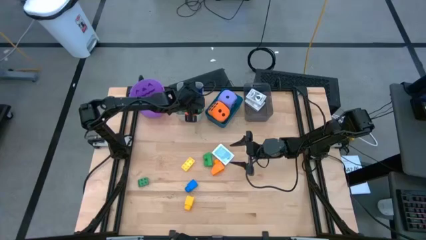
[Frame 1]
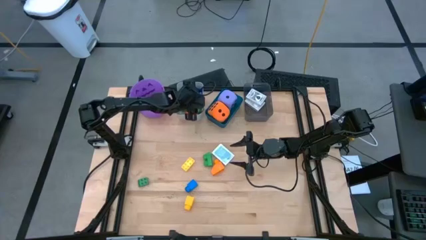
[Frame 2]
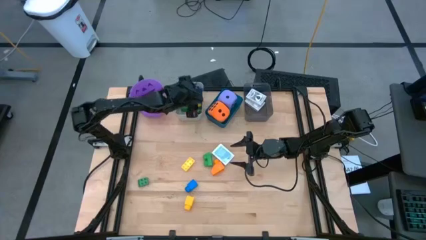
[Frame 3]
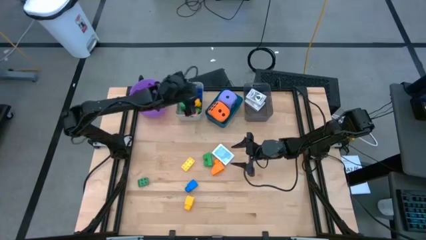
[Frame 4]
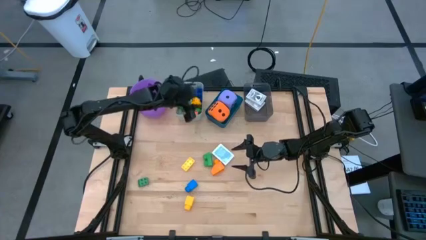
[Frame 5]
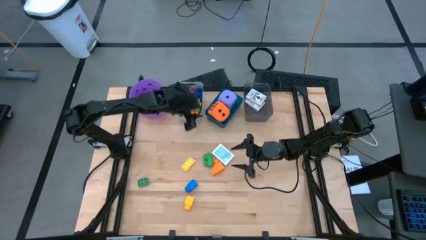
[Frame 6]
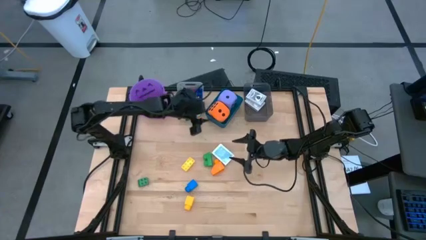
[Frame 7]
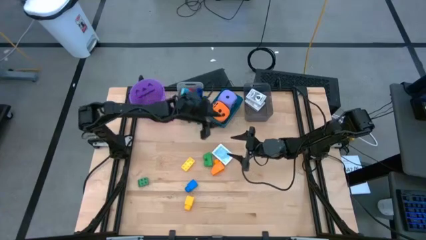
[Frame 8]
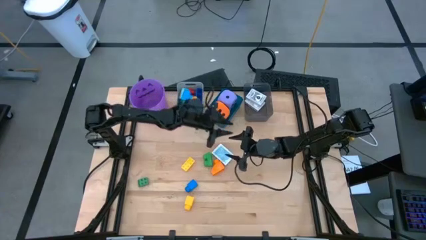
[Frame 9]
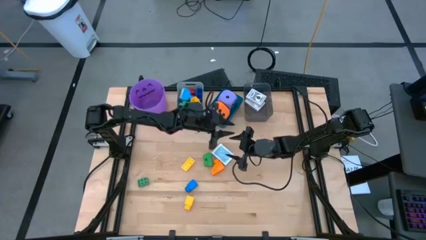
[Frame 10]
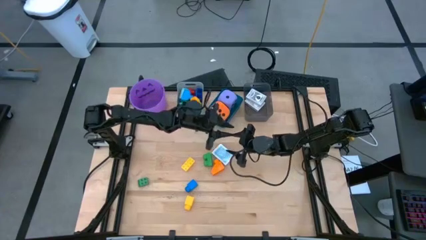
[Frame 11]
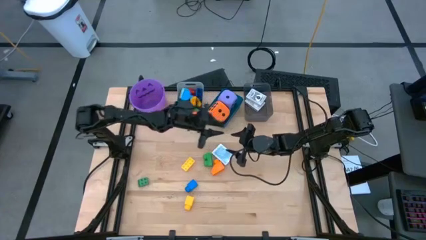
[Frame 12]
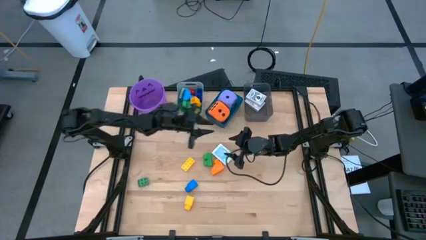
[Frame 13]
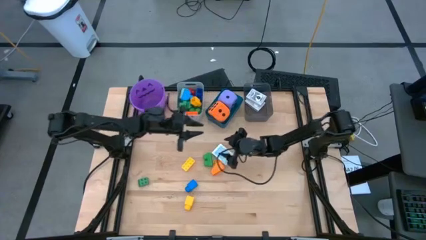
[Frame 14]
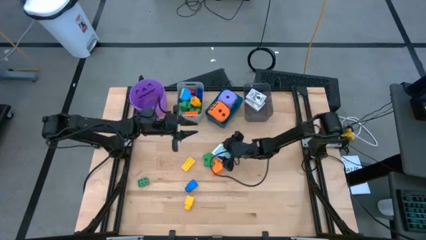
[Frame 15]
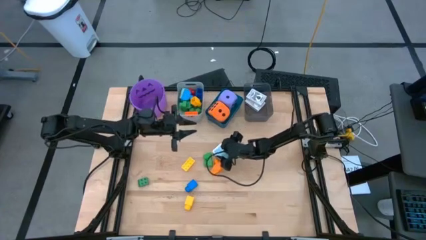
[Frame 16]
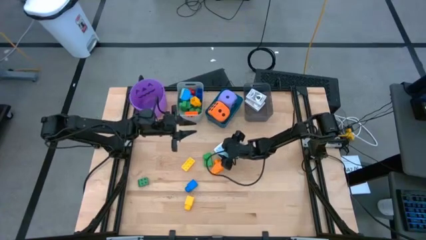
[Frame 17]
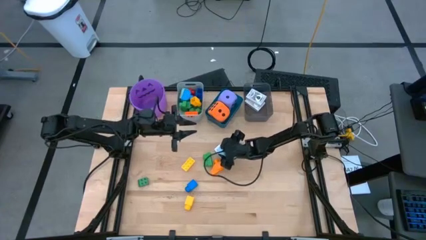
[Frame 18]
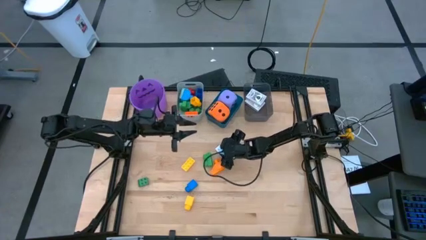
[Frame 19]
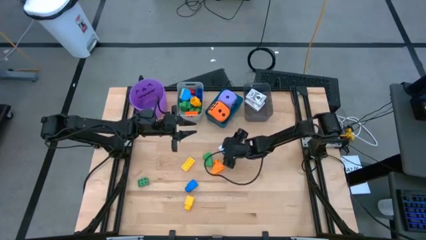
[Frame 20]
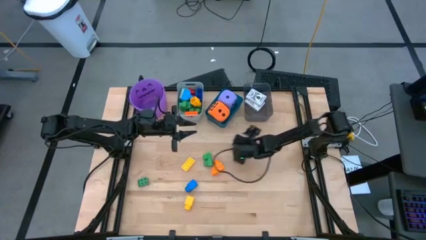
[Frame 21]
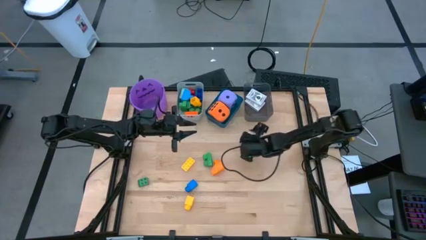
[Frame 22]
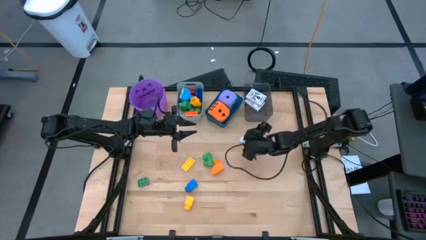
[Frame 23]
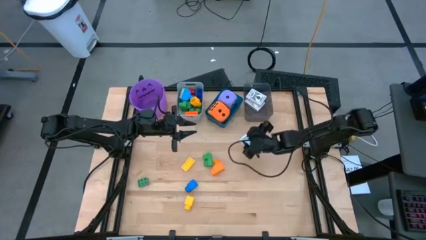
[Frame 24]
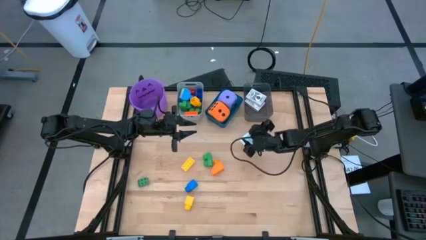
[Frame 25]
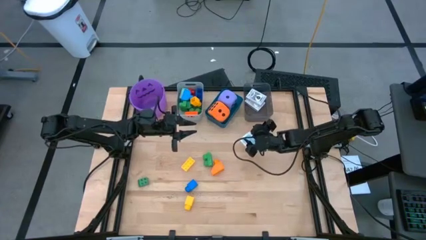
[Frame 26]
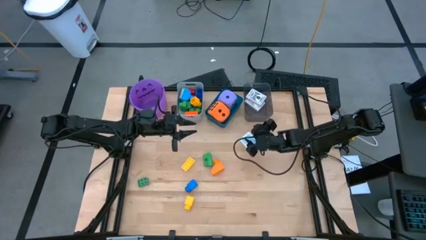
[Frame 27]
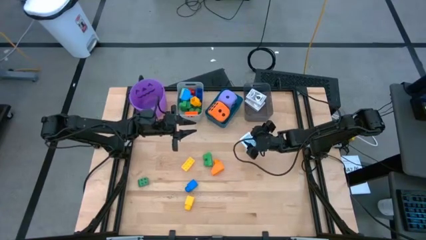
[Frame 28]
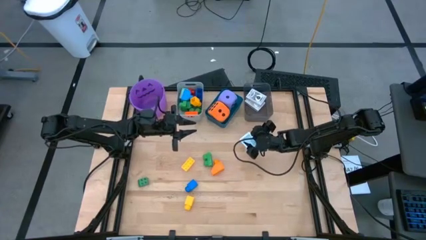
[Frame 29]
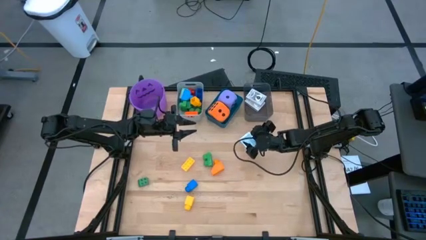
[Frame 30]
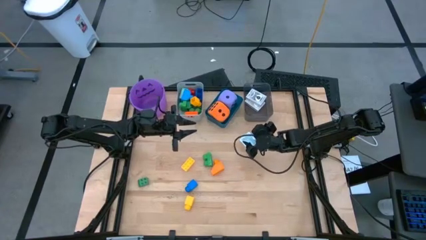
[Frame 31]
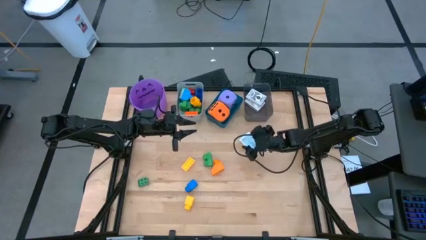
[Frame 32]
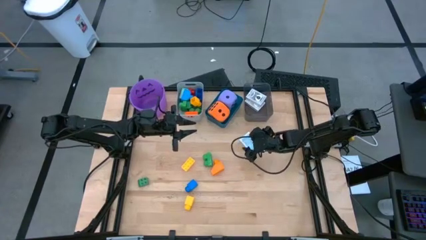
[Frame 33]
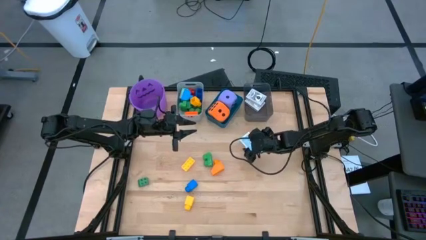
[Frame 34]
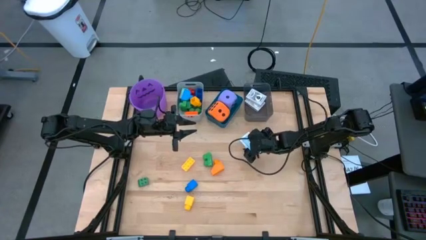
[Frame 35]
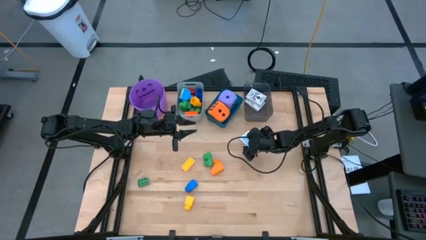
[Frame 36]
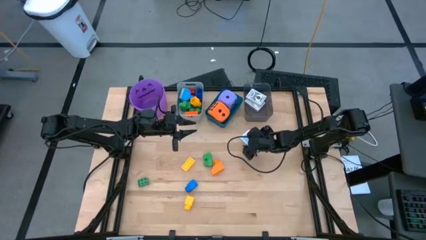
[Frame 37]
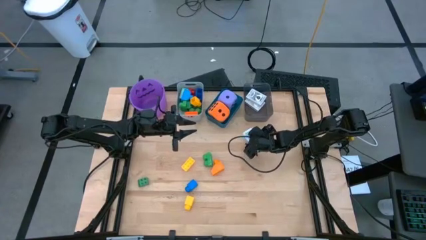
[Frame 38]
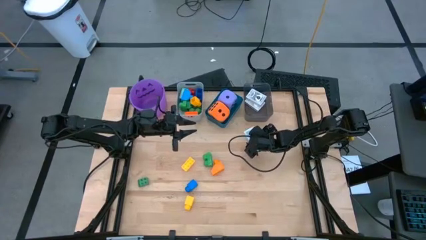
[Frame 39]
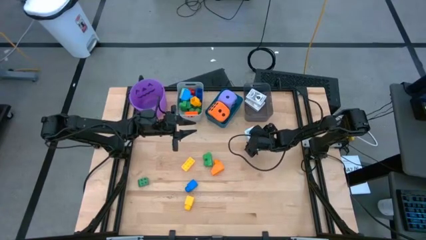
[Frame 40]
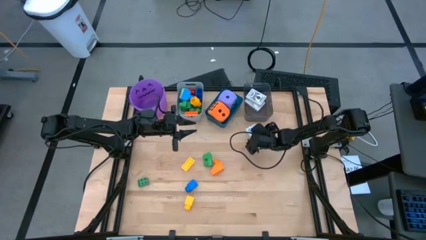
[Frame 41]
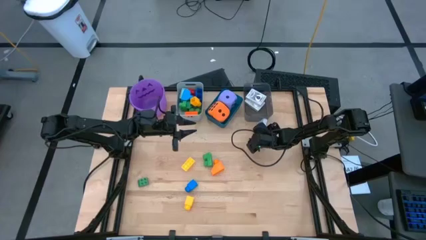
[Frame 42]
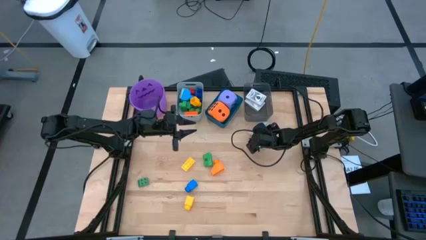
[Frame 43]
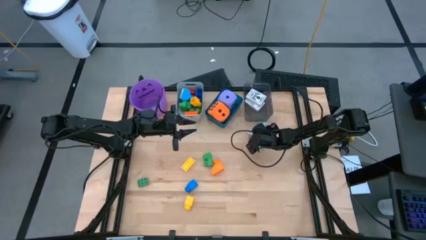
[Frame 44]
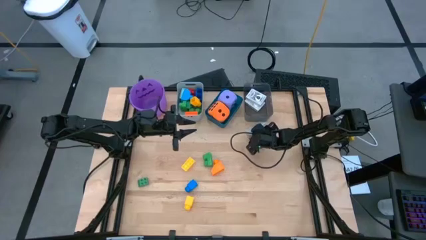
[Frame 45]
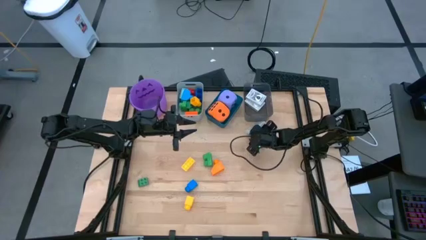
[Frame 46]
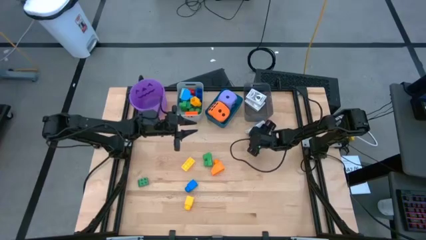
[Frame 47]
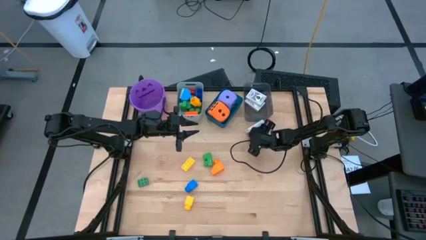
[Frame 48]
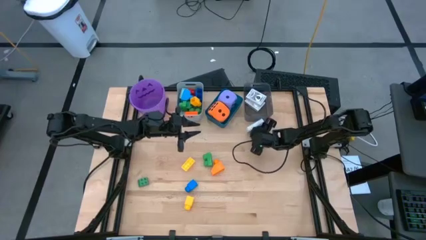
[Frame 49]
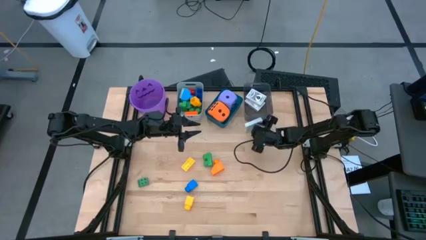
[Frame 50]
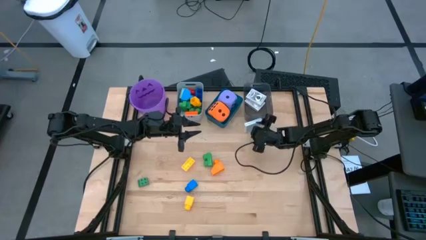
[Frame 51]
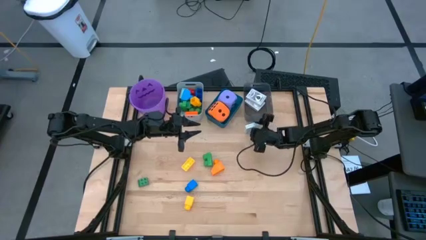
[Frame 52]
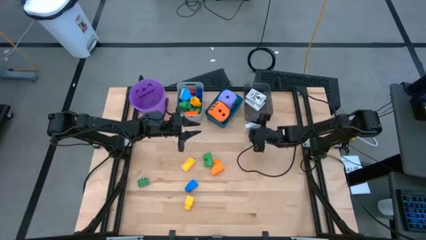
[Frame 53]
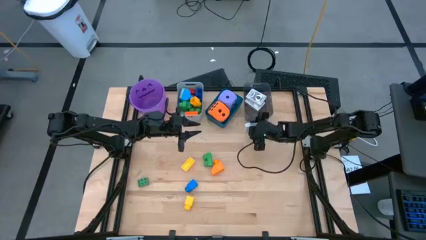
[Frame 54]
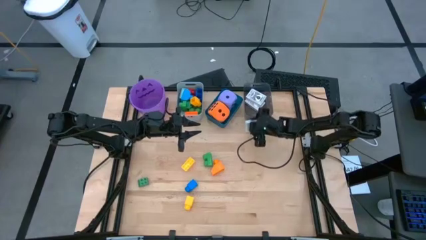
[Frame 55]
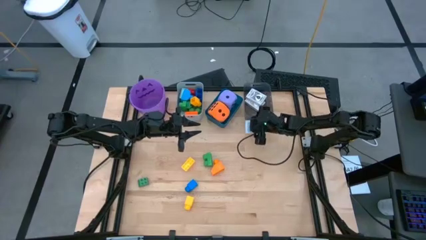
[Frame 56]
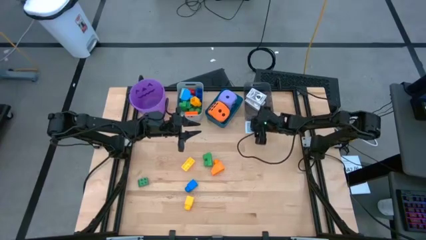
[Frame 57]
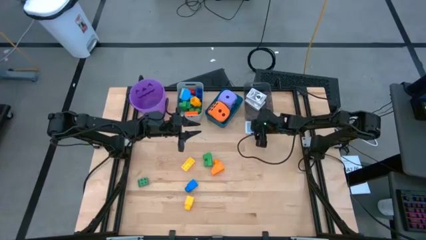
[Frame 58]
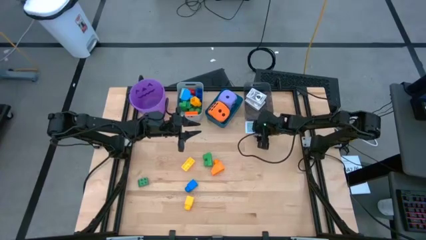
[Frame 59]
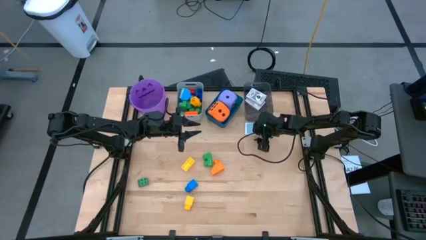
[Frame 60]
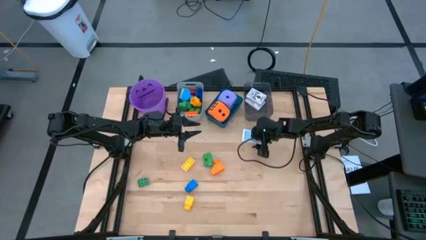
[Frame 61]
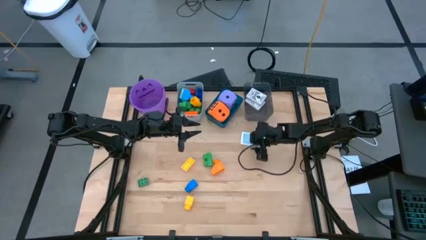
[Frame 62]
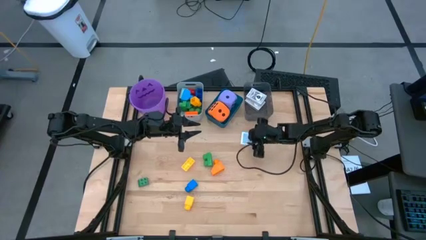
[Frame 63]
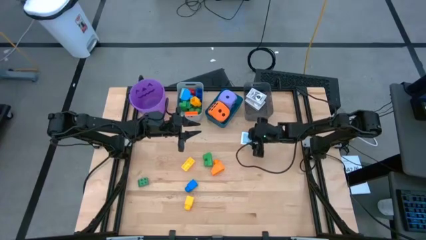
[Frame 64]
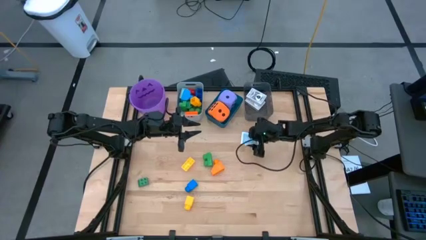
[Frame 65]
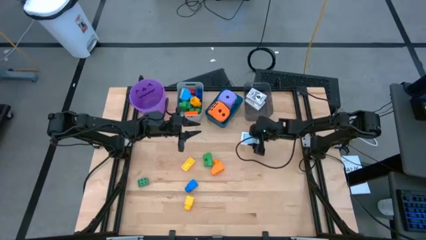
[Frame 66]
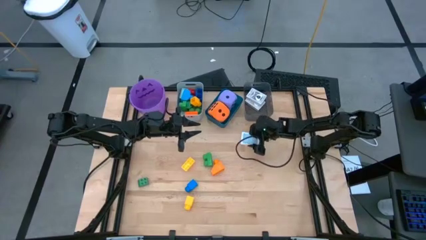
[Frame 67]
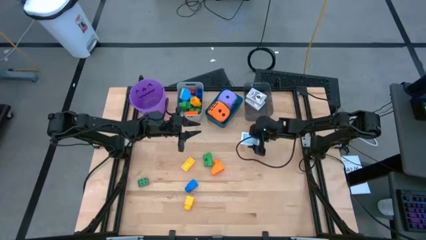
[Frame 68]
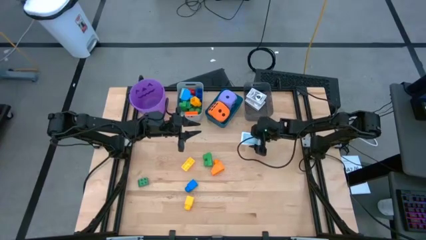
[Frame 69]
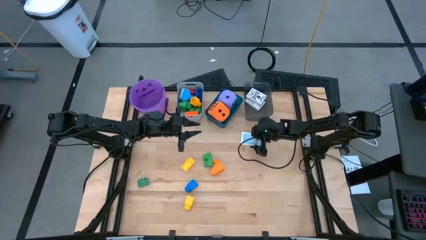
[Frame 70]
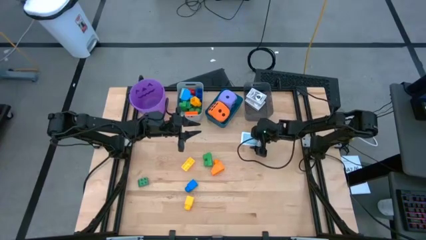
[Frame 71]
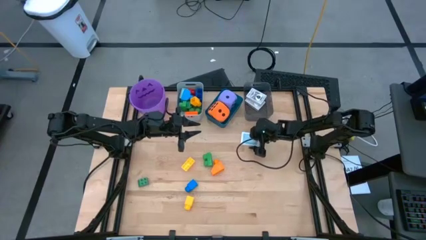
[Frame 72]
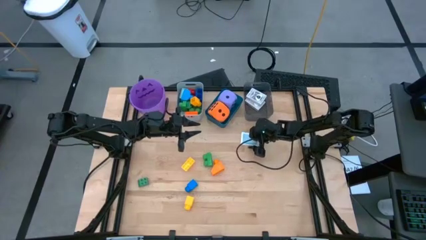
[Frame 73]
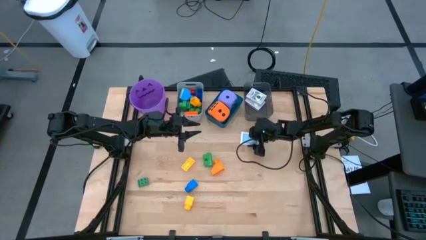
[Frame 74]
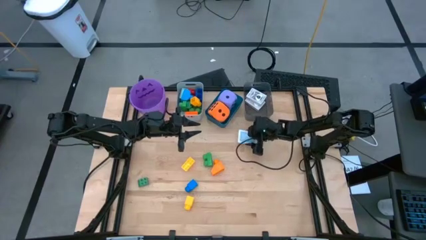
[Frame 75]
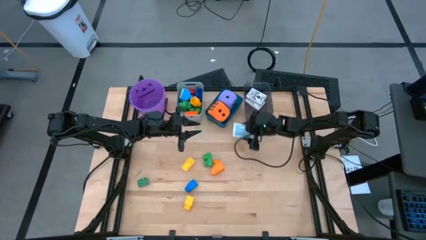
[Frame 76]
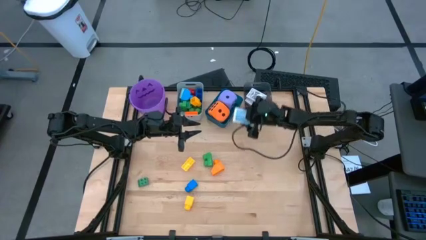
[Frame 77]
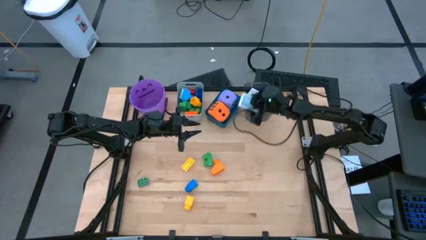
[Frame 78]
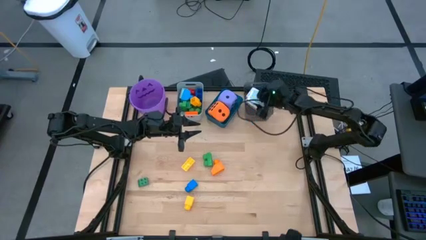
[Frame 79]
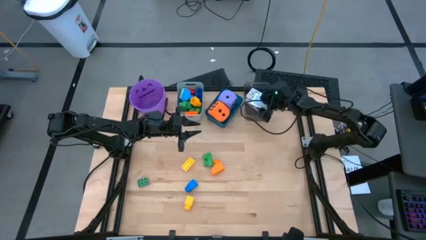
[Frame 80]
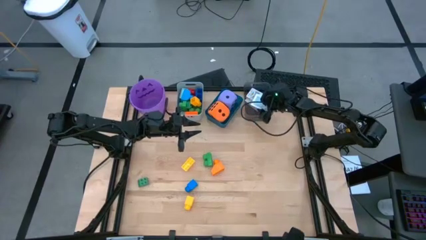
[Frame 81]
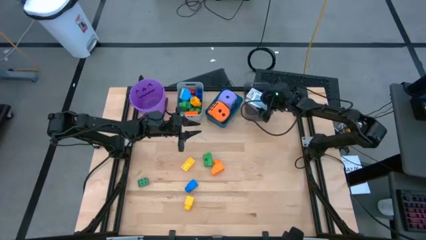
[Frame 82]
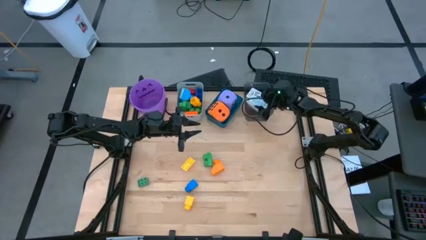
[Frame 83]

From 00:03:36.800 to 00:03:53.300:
Task: Pick & Place Toys
Put the blue and white deck of cards into the black bin

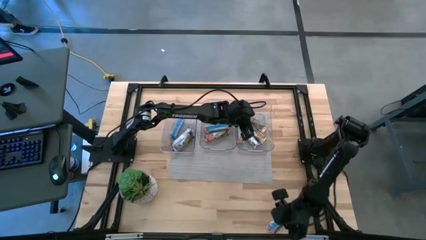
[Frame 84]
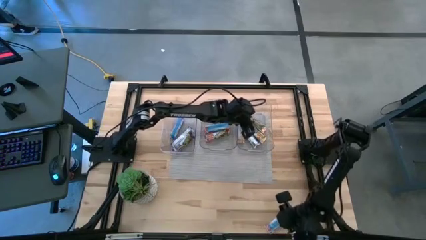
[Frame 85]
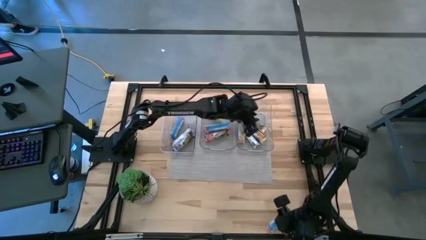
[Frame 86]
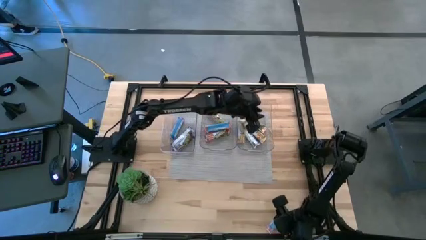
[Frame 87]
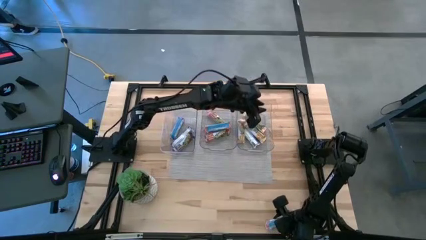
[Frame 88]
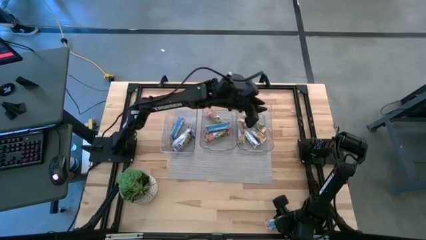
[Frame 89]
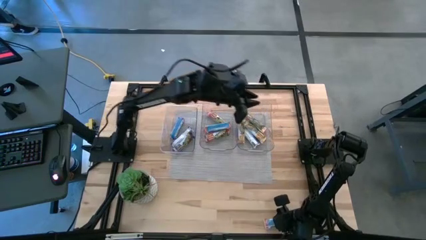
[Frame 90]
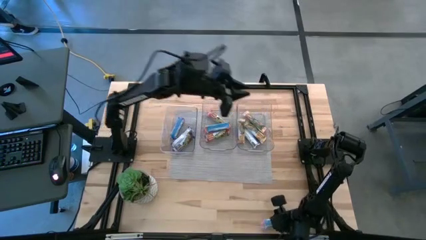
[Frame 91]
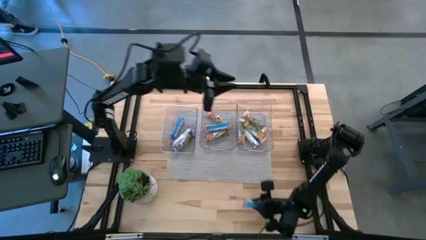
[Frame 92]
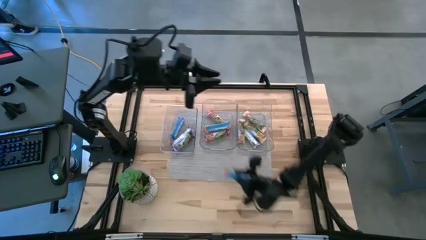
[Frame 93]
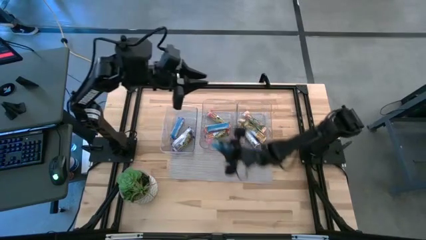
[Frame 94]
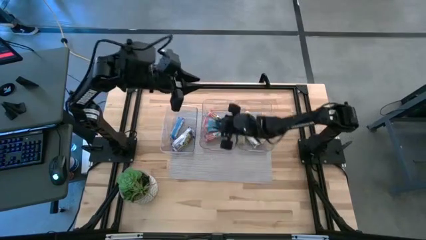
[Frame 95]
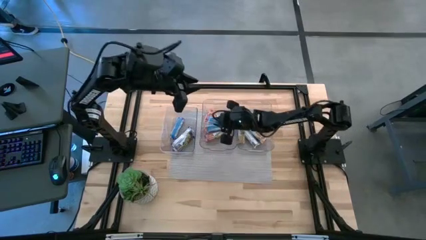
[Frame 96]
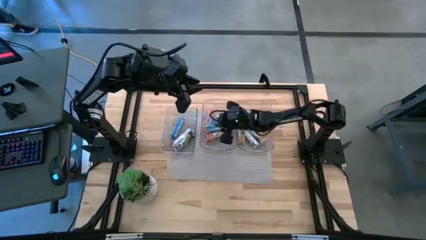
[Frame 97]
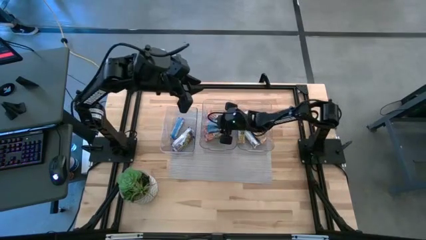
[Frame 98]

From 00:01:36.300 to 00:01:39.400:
Task: Pick and place Granola Bars by type
Put the red granola bar into the middle transparent bin
